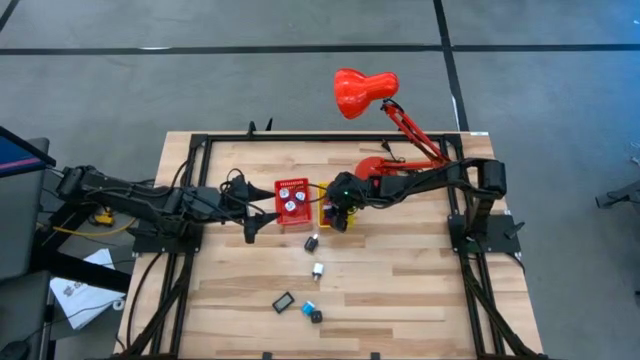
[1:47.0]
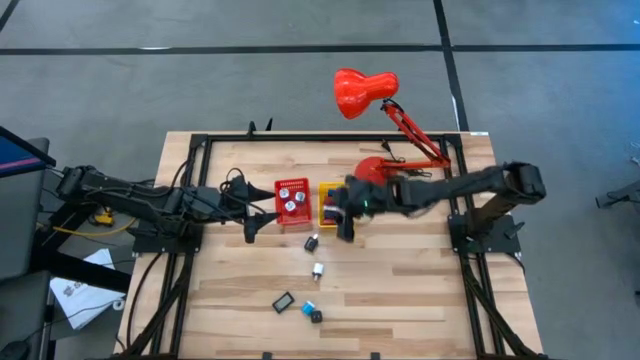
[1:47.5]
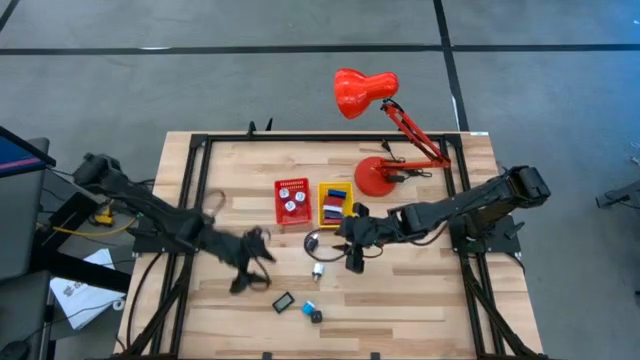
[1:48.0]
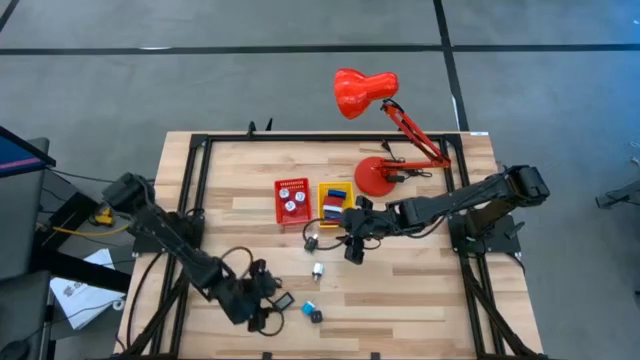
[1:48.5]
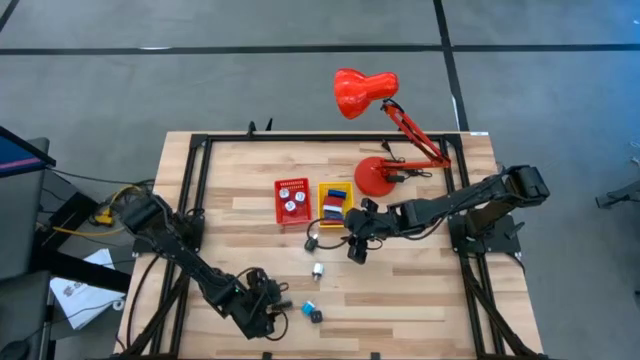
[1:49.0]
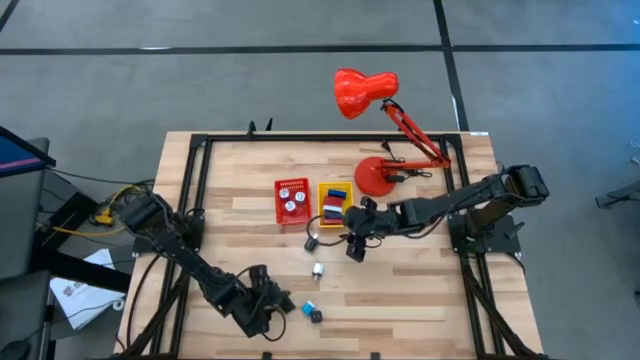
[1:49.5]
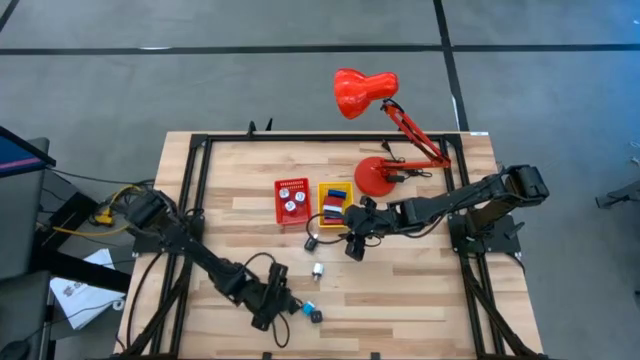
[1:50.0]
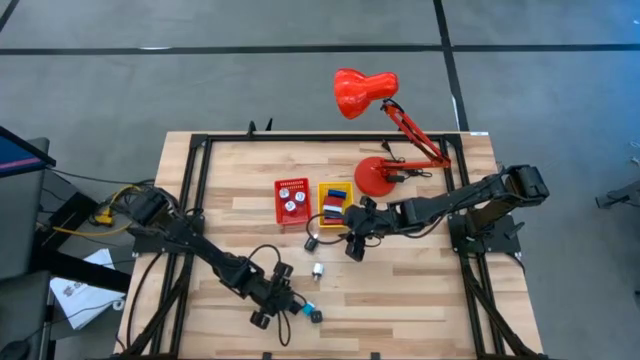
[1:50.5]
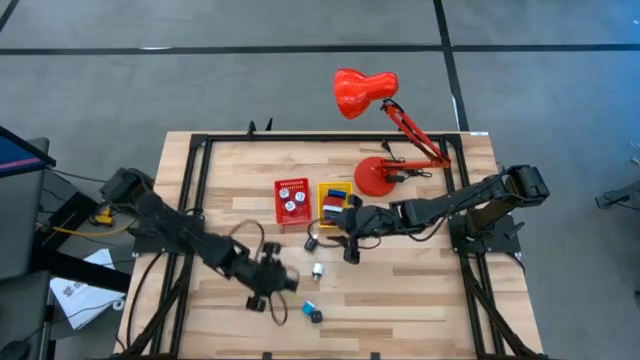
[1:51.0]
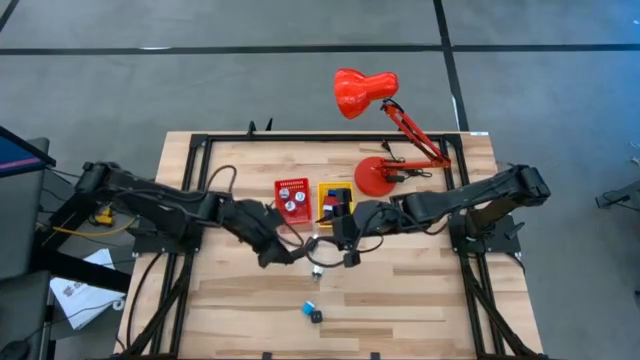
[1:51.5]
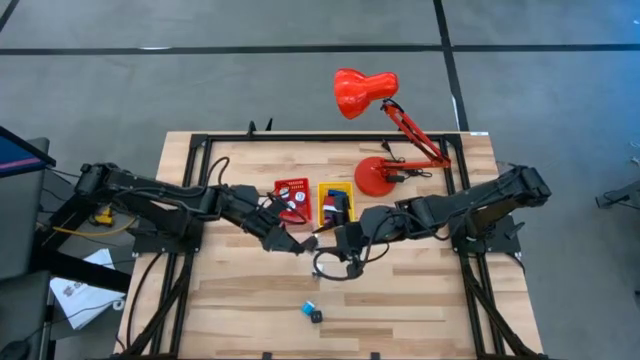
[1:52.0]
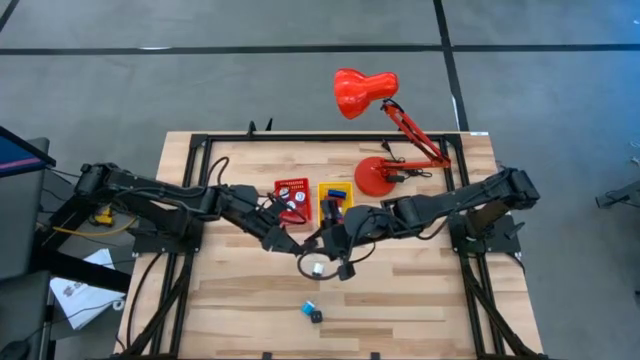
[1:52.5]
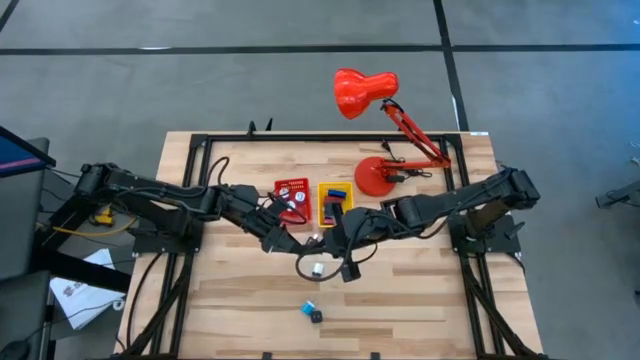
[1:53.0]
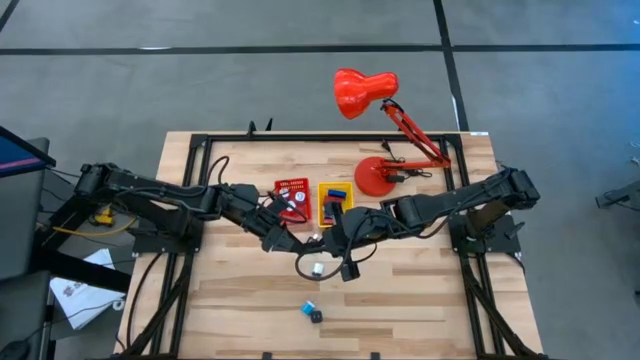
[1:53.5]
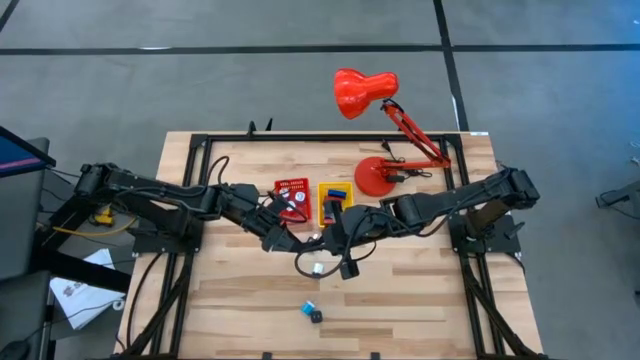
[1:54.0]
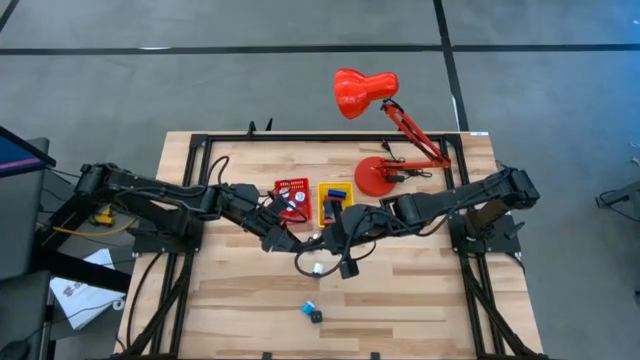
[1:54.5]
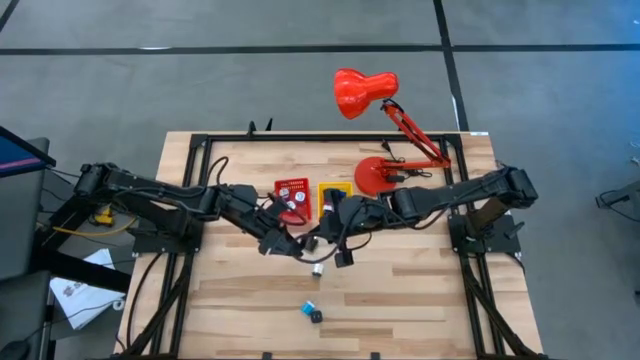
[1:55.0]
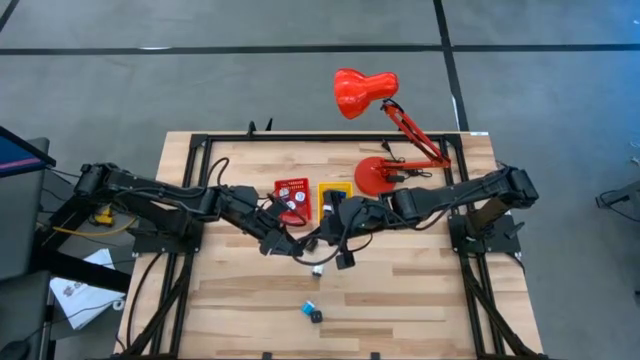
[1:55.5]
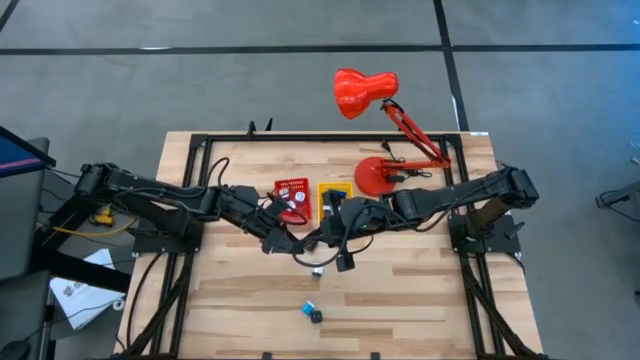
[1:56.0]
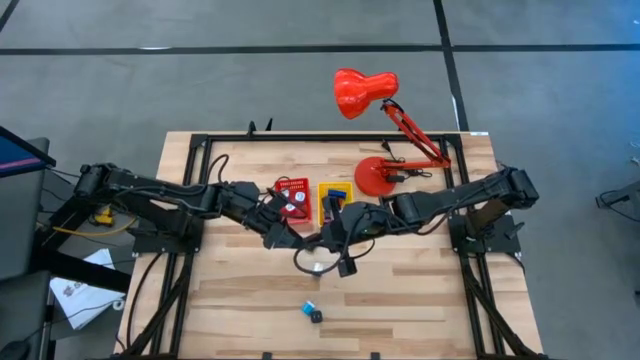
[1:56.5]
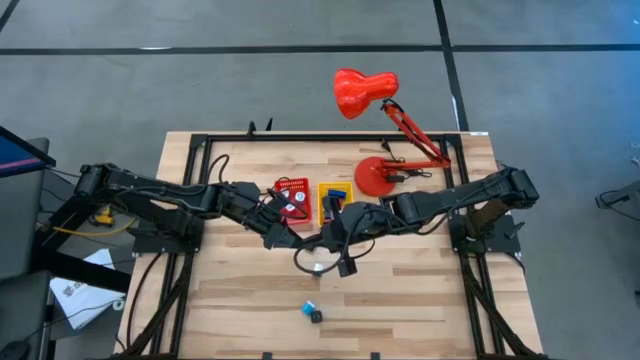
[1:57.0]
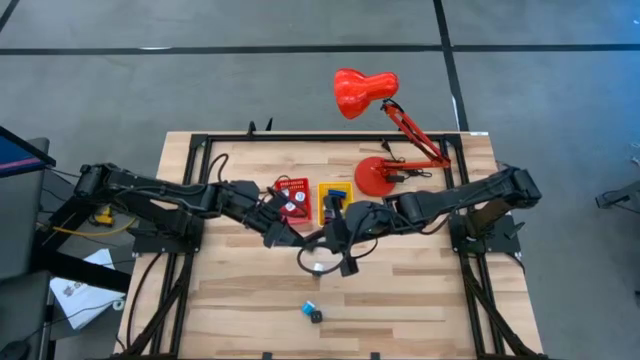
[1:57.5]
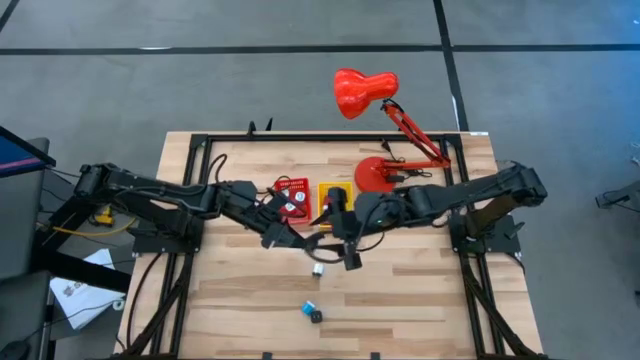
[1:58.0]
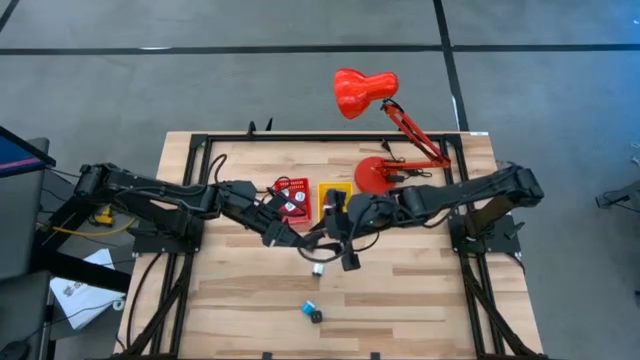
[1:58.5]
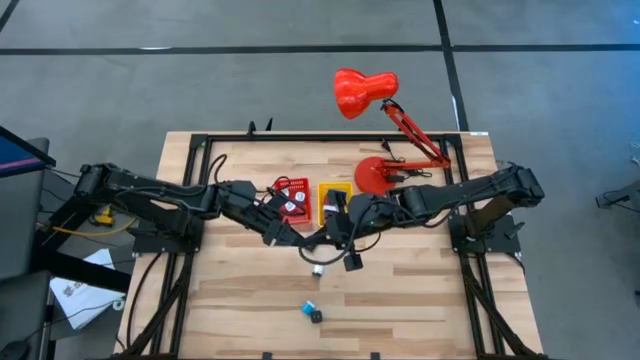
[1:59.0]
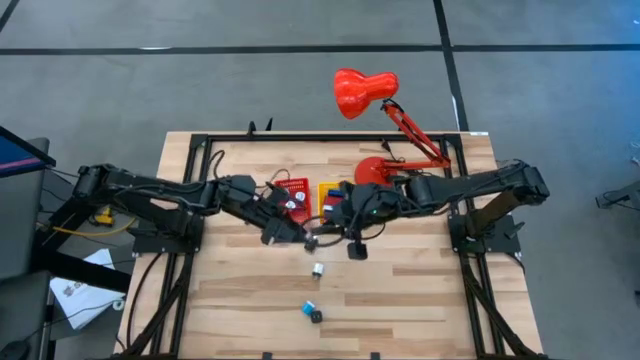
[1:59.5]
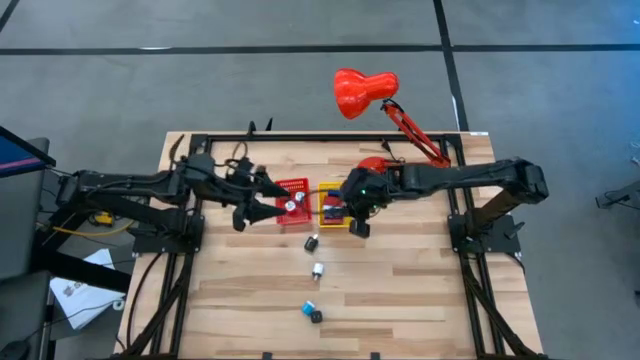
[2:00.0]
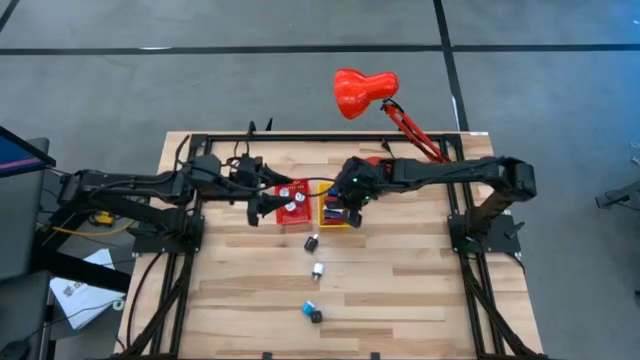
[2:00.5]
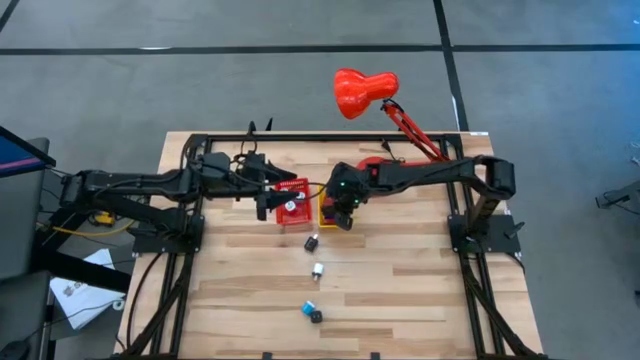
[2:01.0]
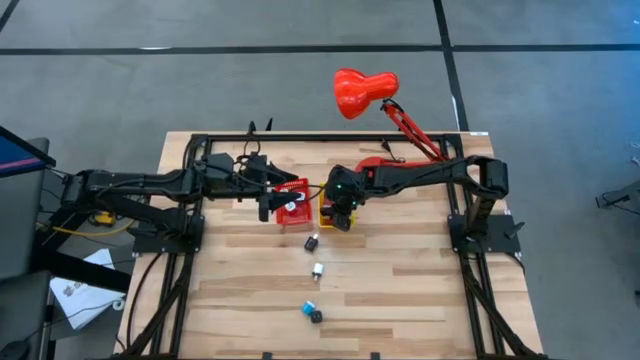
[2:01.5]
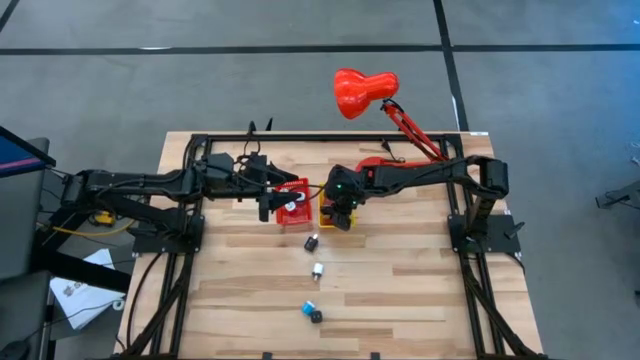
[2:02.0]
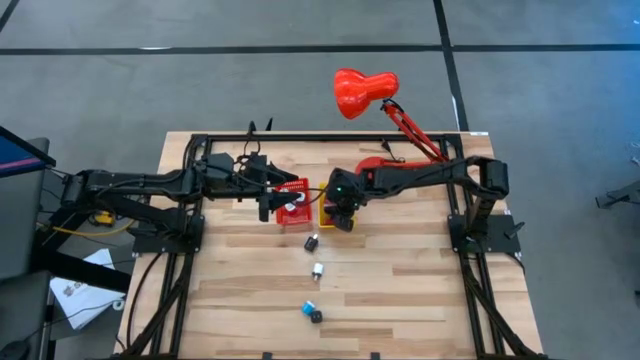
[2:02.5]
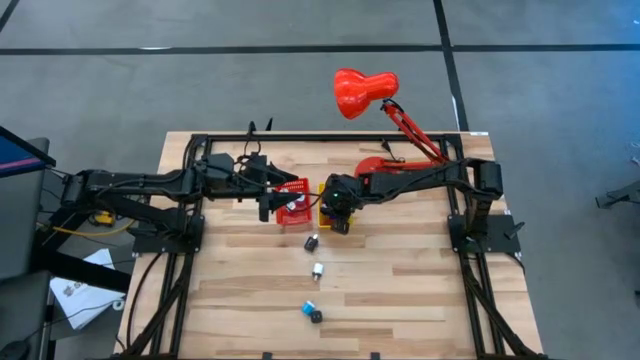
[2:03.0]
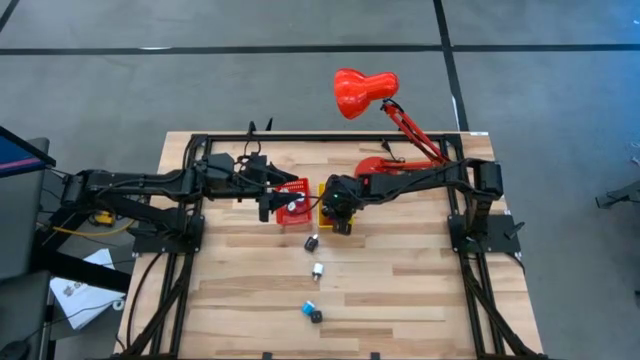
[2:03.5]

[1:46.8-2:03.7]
Task: Pick & Place Office items
Put the black digital timer into the yellow basket

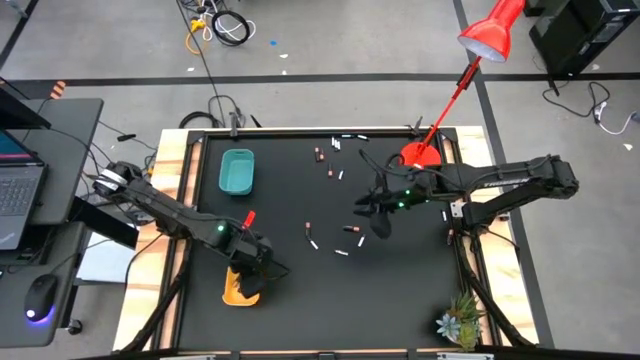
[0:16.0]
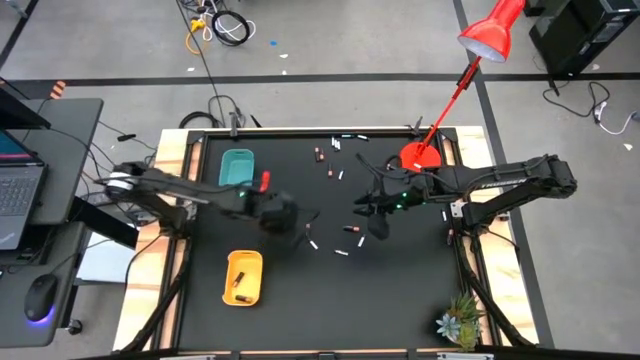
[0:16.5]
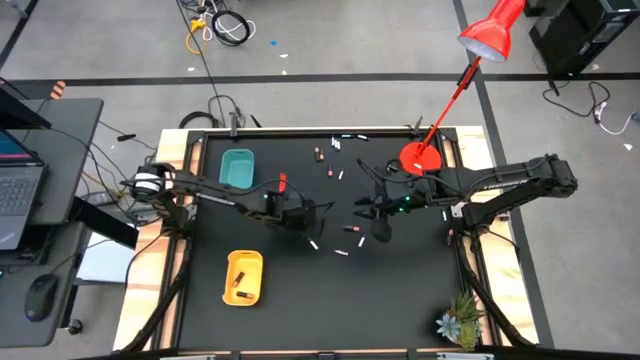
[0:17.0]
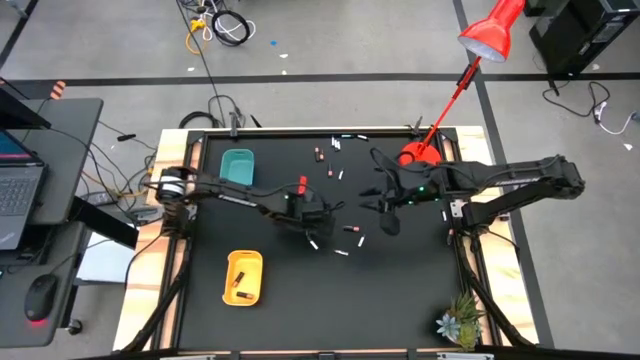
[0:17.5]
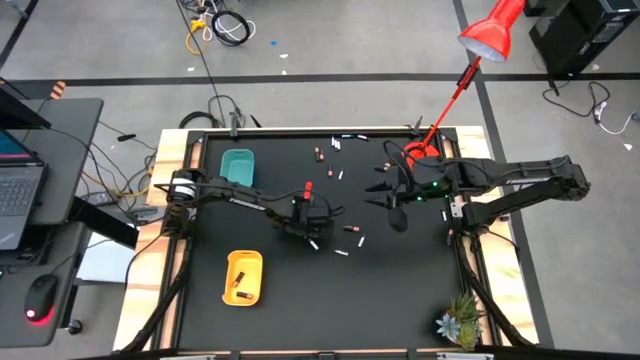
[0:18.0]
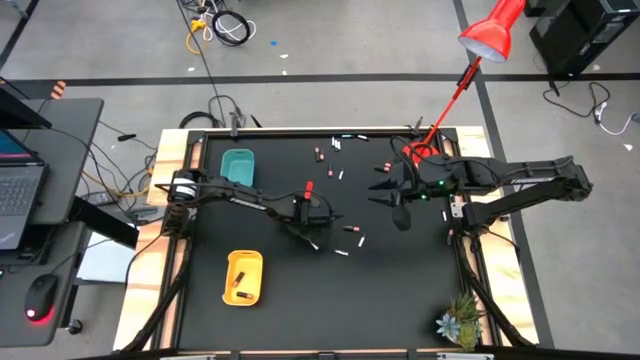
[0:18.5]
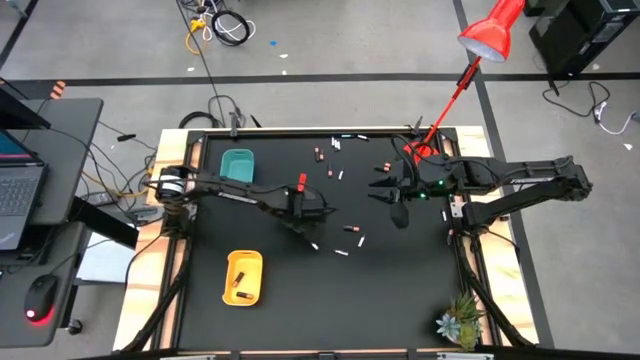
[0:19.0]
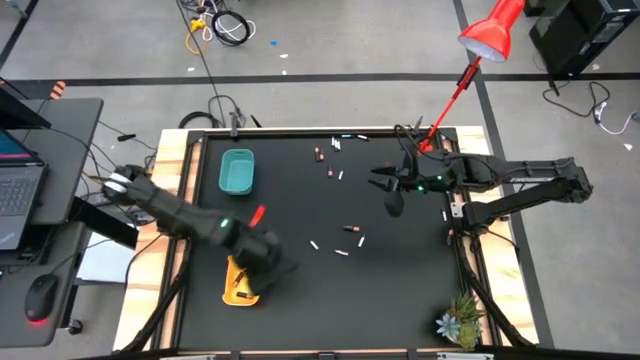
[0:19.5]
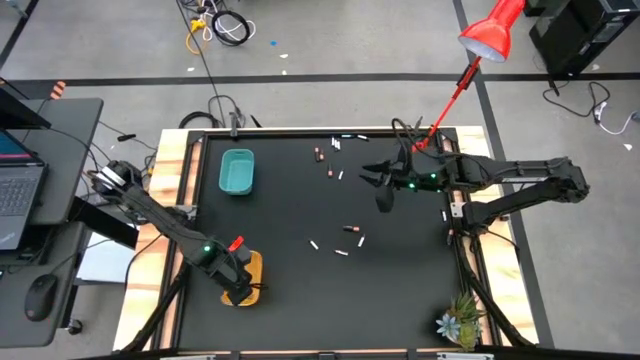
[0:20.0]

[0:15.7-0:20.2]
Task: Sort batteries
Put the black battery into the yellow bin
